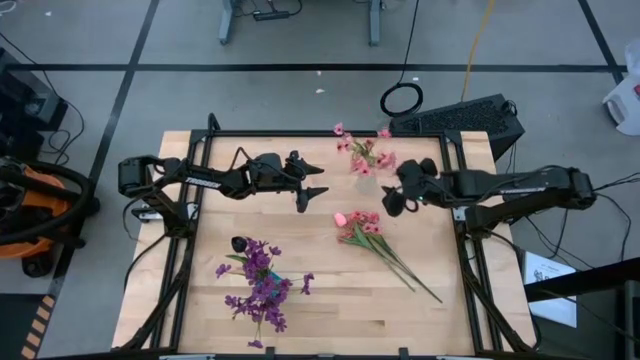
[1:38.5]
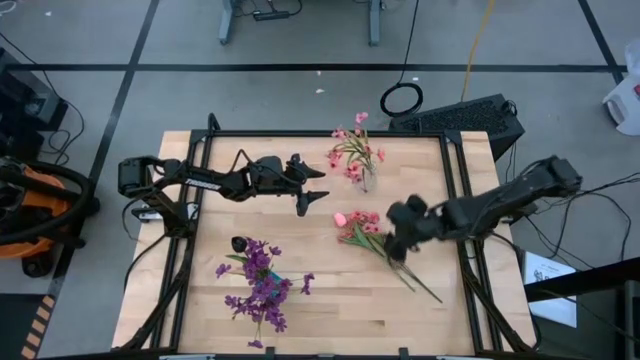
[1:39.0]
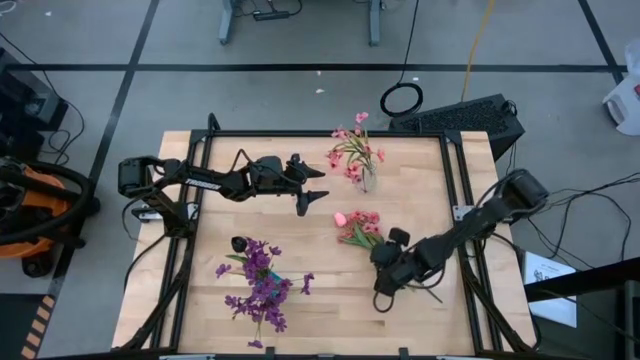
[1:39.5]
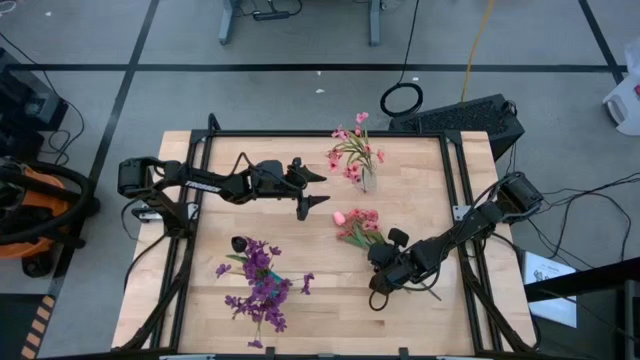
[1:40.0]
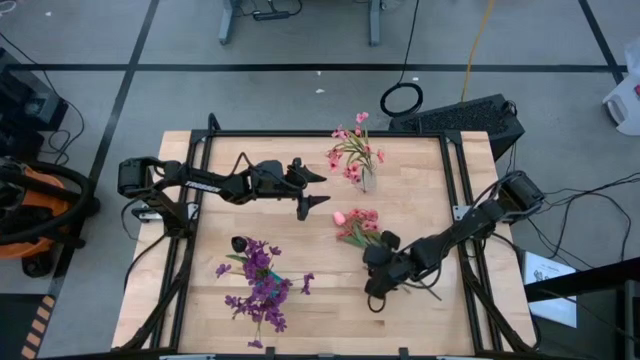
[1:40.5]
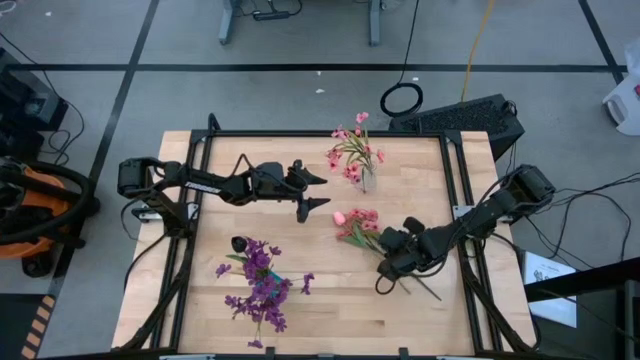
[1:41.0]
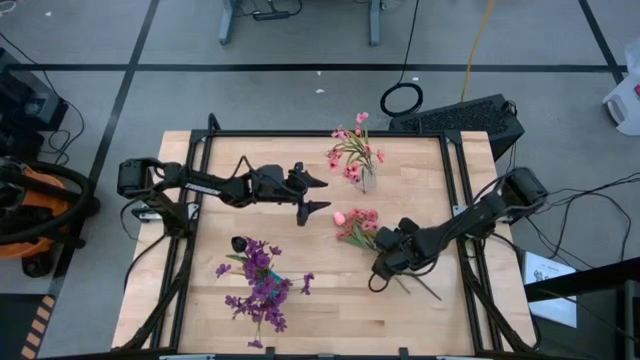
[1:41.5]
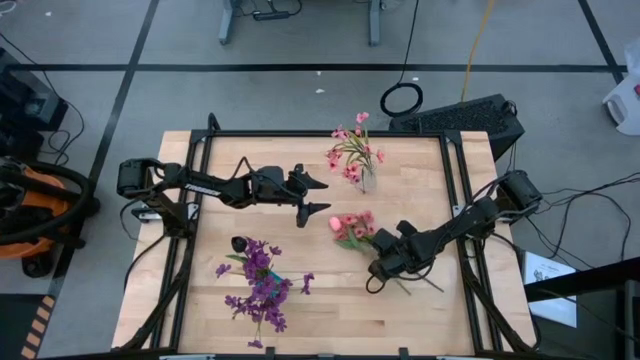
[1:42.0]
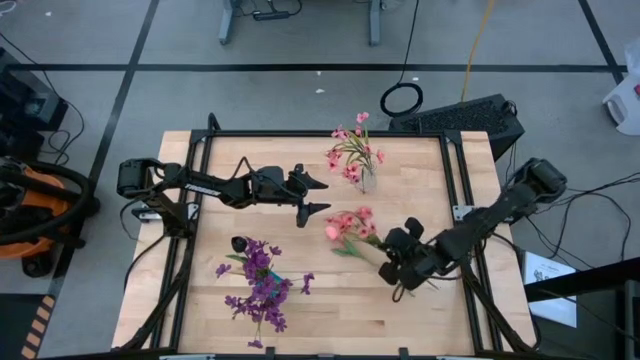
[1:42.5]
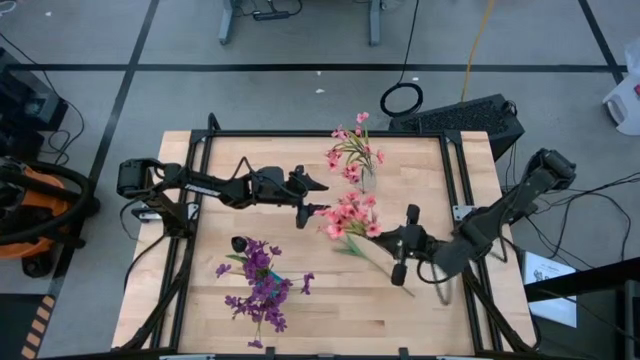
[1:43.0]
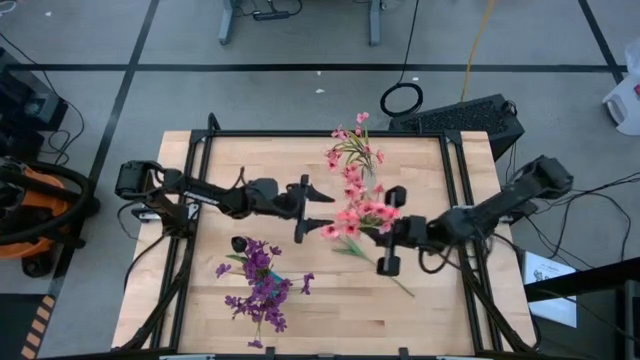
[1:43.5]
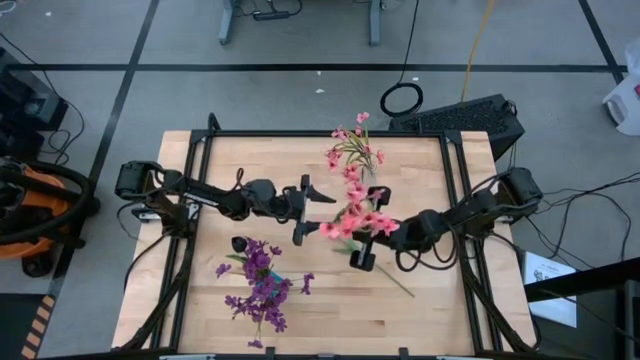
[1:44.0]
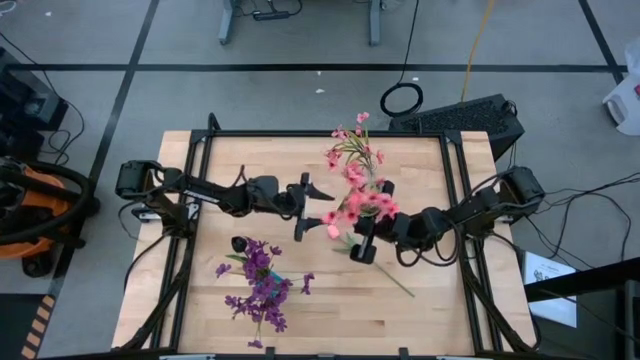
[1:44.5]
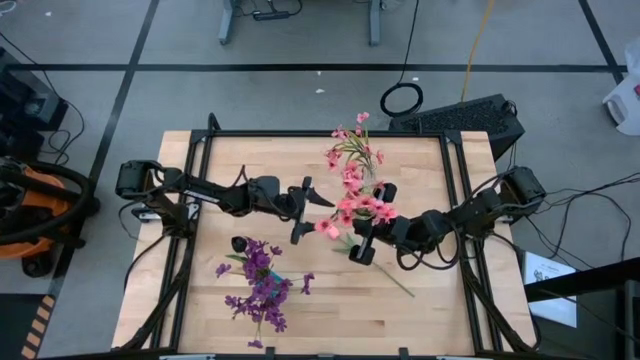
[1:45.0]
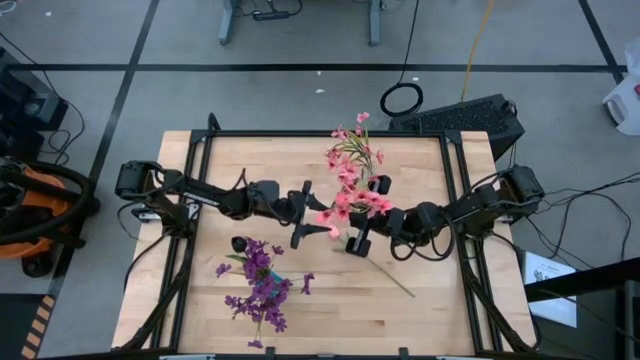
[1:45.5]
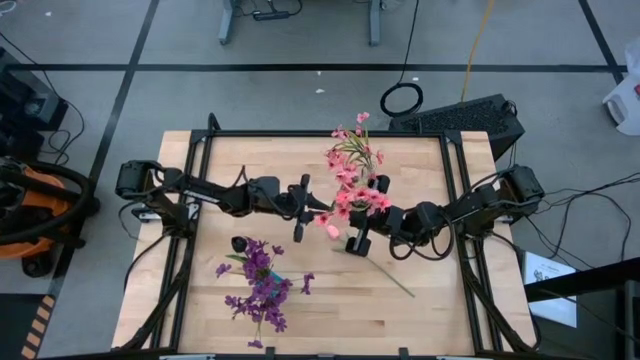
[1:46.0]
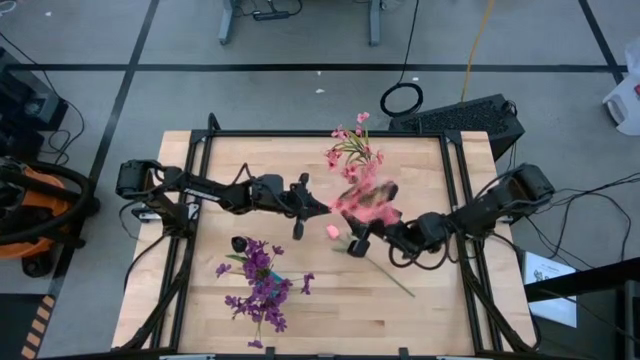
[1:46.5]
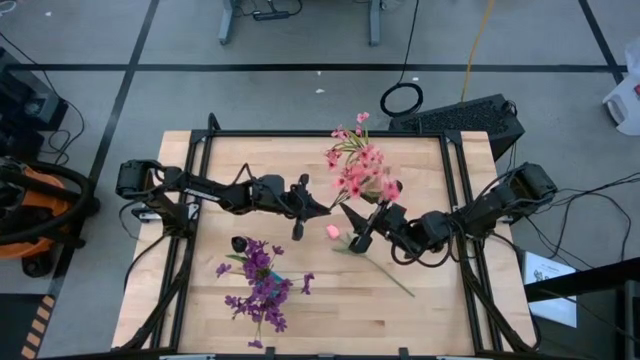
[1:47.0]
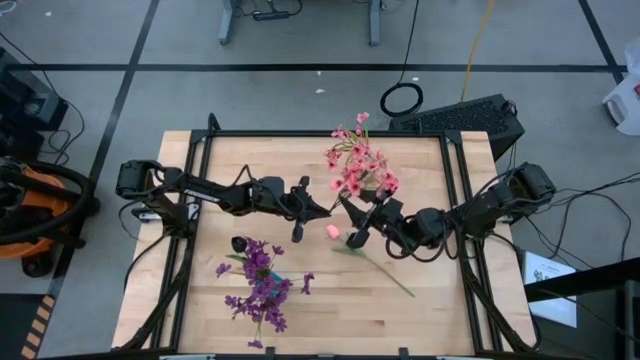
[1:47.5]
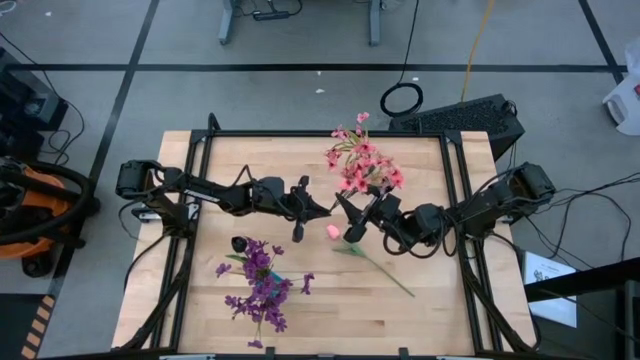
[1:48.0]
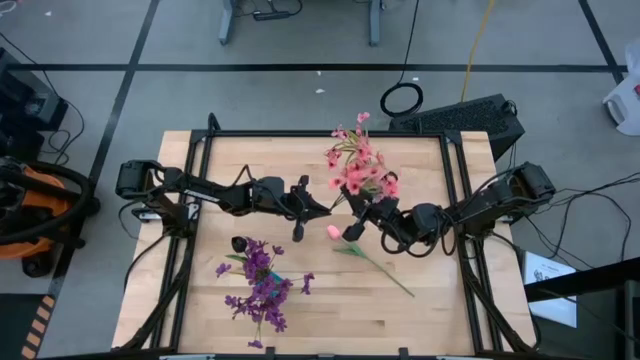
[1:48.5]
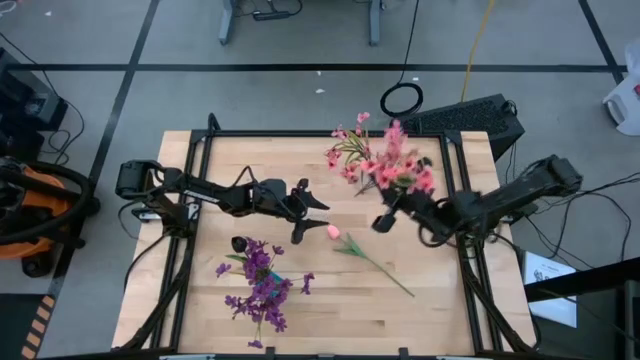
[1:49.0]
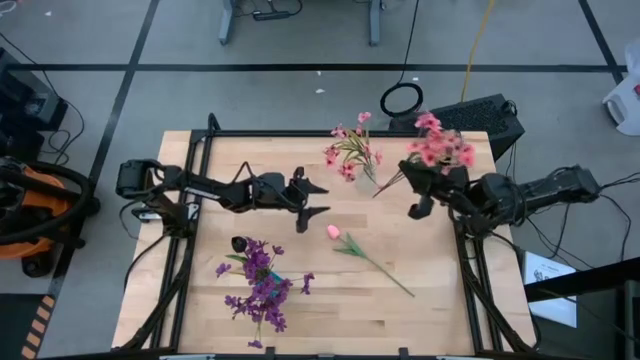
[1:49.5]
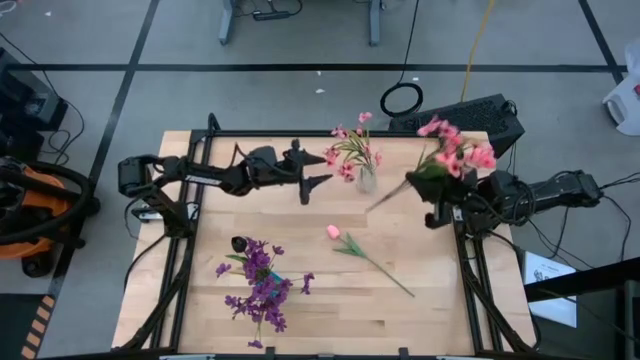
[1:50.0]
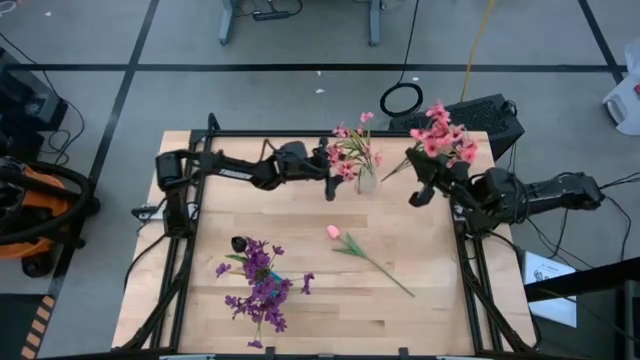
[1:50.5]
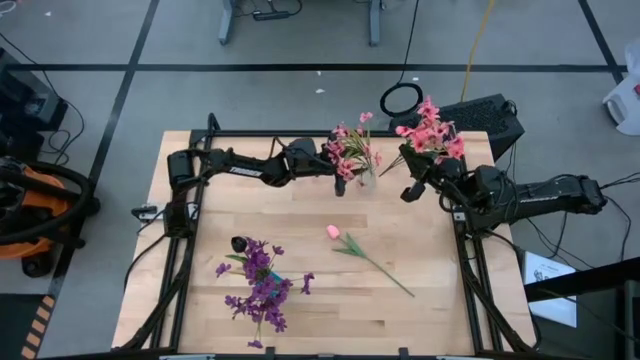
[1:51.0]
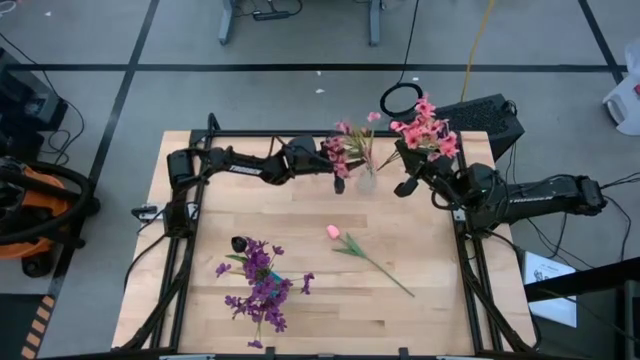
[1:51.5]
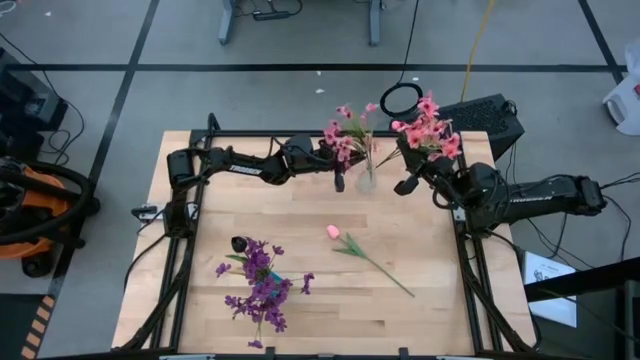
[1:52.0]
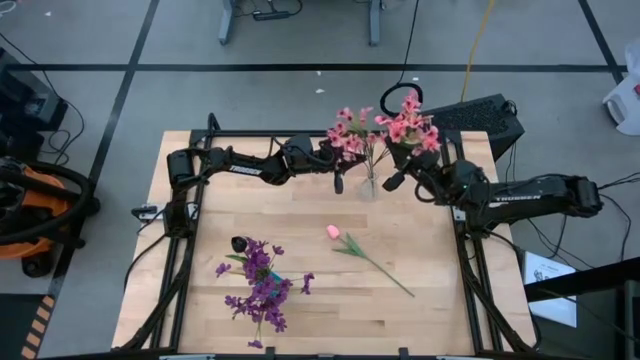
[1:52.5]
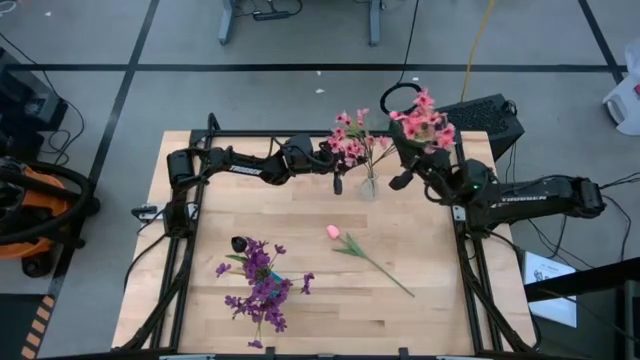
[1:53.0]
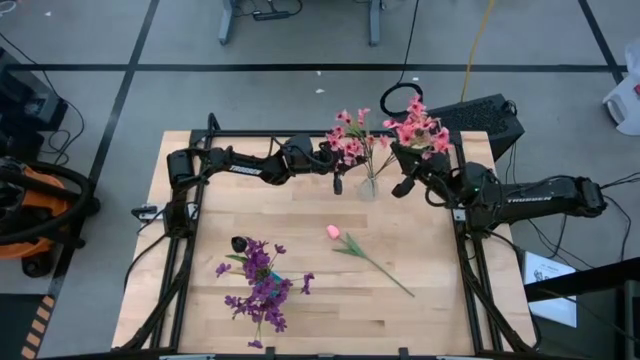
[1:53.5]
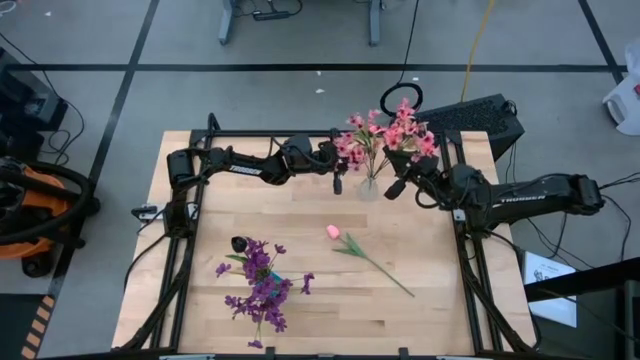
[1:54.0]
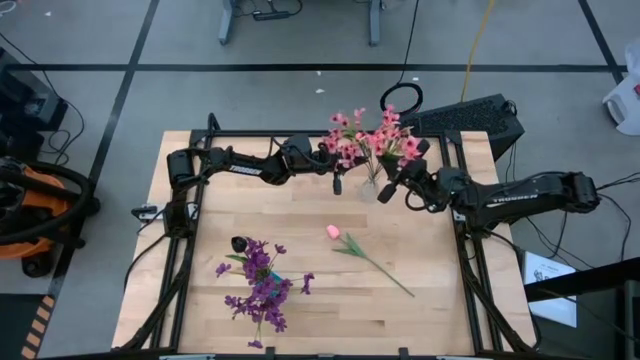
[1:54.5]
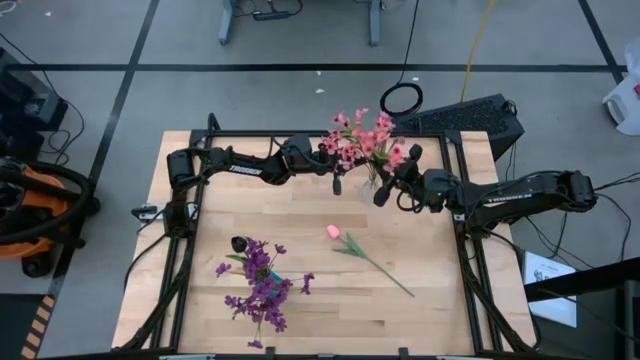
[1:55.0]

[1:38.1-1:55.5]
Task: Sort flowers into vase by color
Put the pink flower into the transparent vase

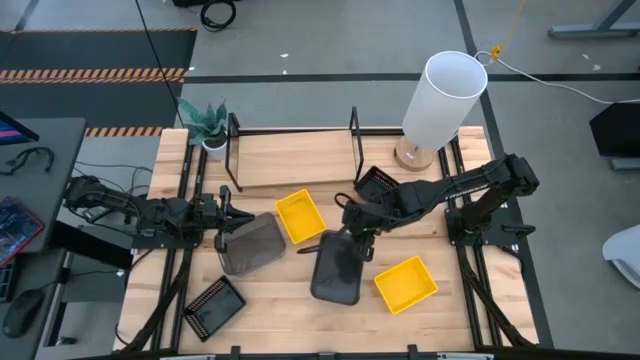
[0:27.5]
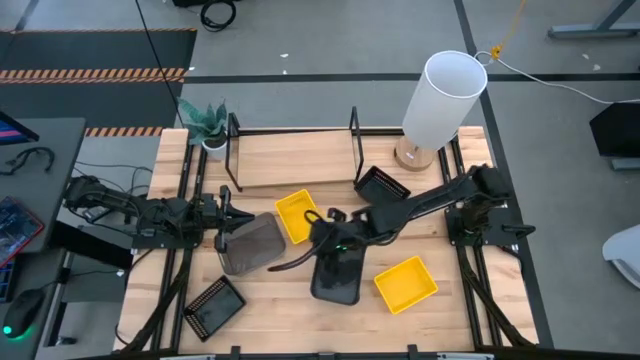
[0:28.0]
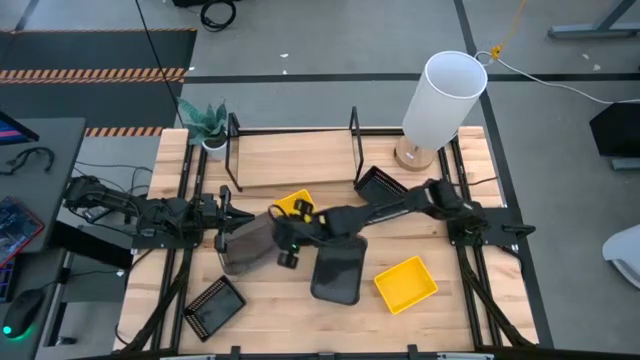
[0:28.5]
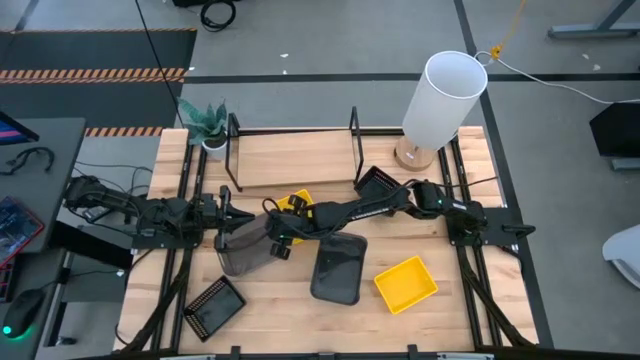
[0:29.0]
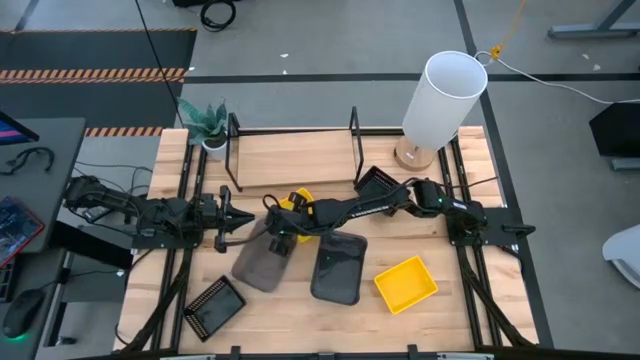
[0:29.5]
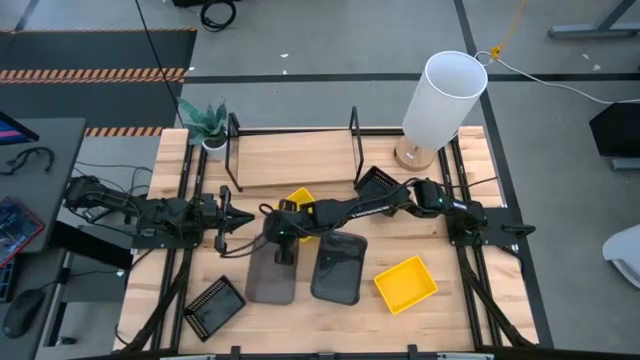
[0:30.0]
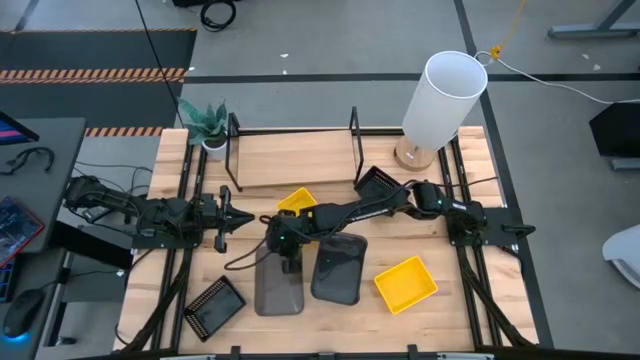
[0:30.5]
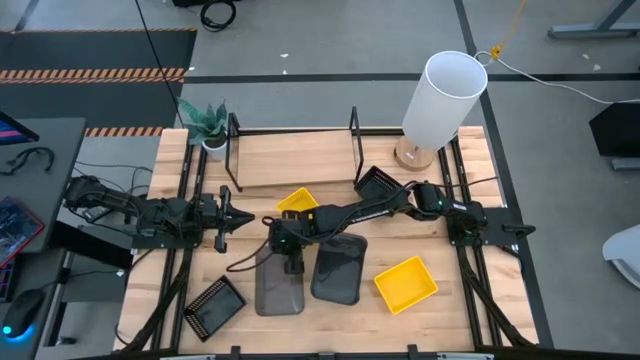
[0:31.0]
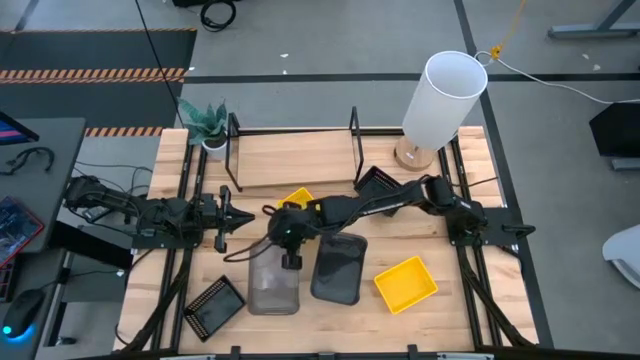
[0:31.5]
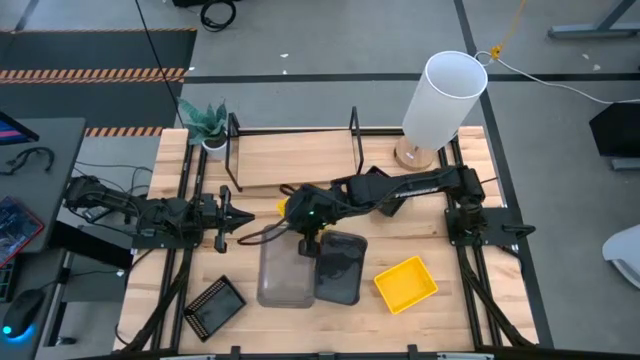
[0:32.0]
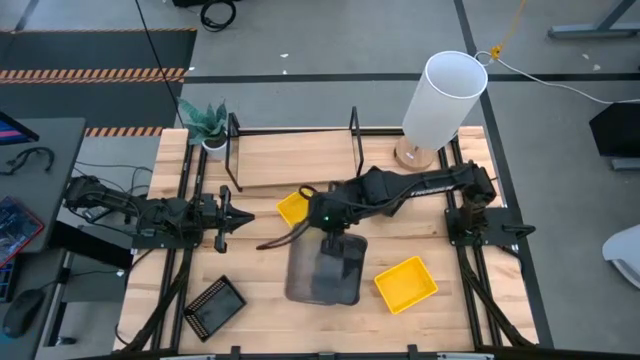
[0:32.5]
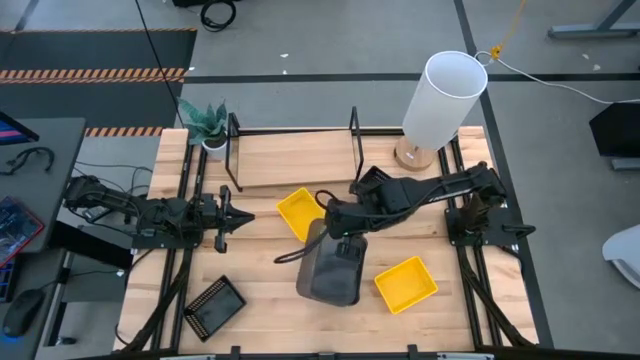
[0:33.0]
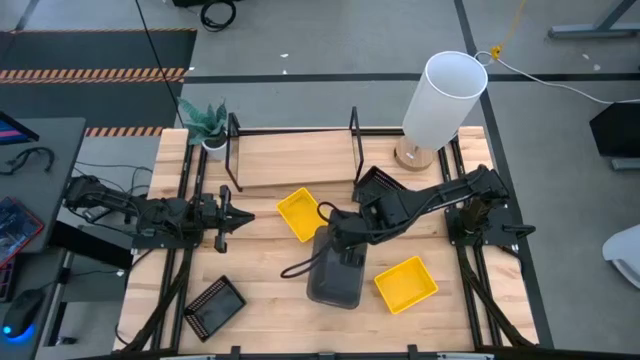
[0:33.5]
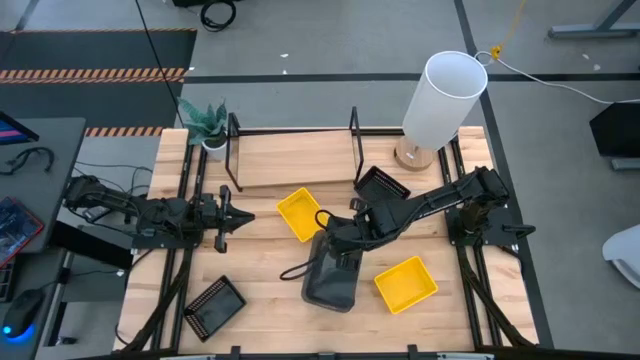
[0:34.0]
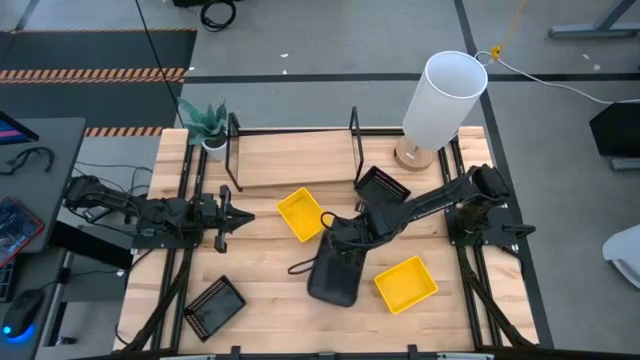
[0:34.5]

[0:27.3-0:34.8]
Task: Stack baskets on shelf by color
Stack the left gray bin on top of the gray bins
